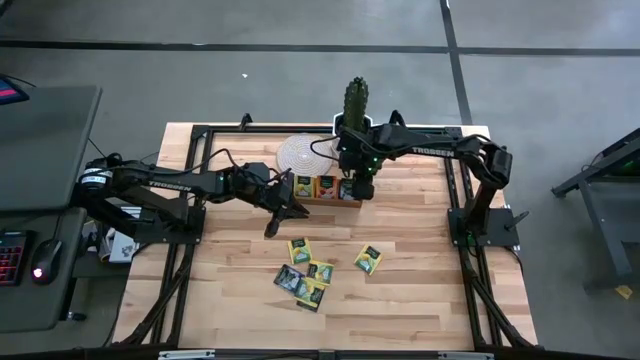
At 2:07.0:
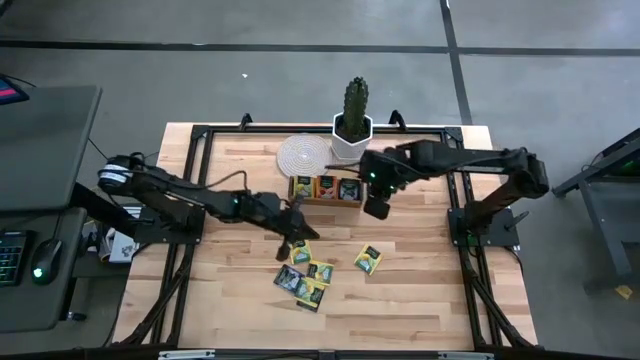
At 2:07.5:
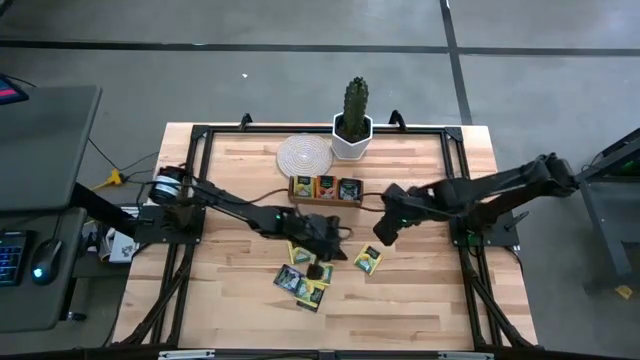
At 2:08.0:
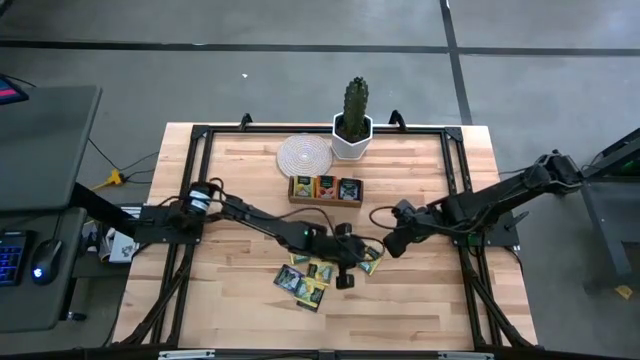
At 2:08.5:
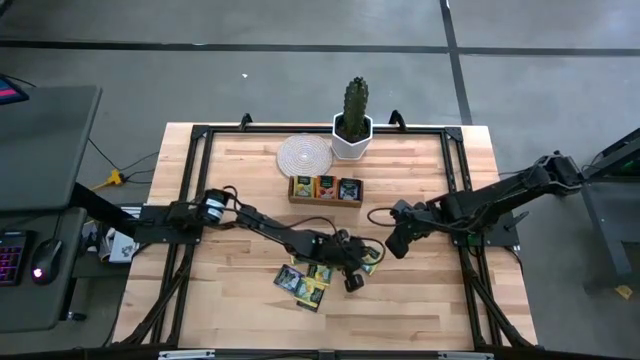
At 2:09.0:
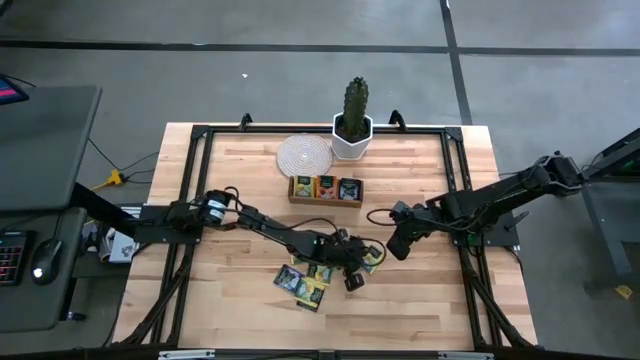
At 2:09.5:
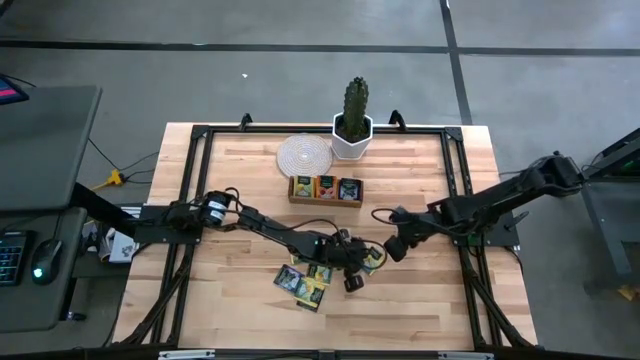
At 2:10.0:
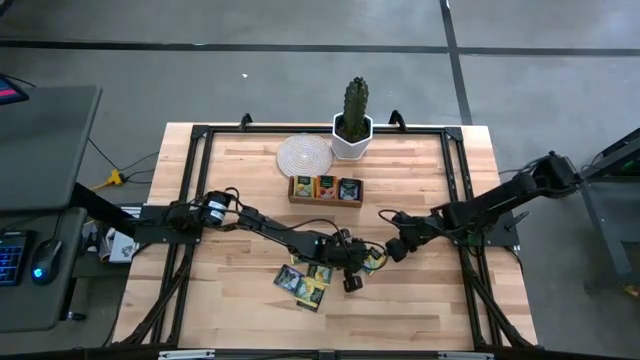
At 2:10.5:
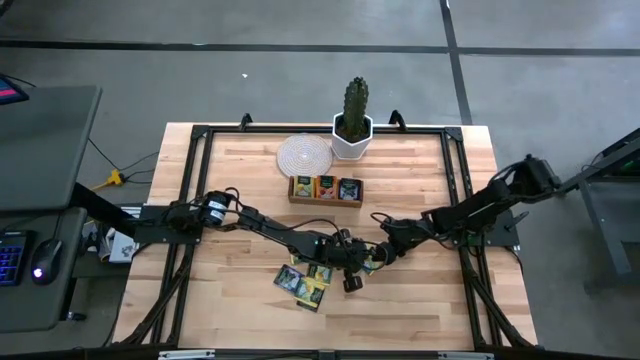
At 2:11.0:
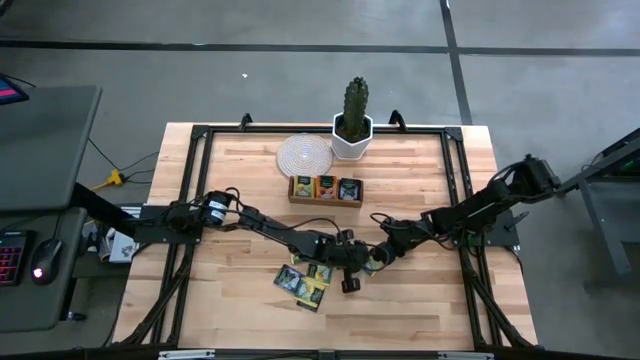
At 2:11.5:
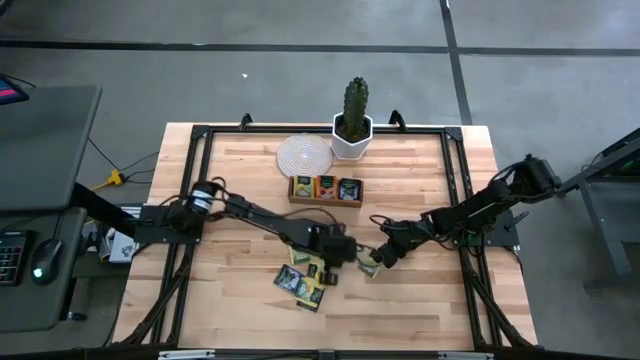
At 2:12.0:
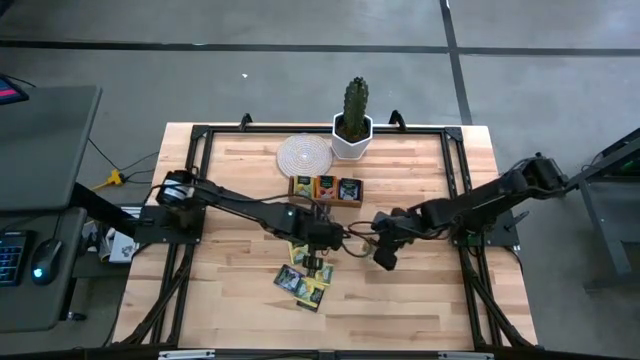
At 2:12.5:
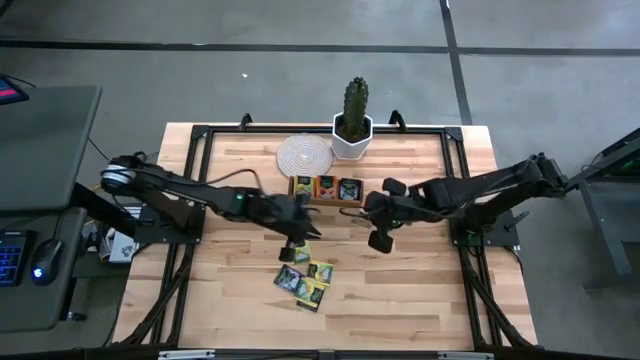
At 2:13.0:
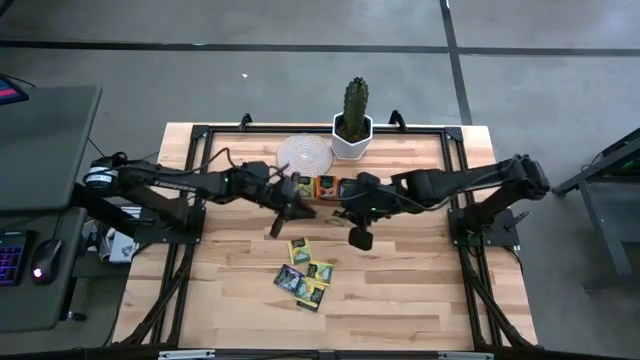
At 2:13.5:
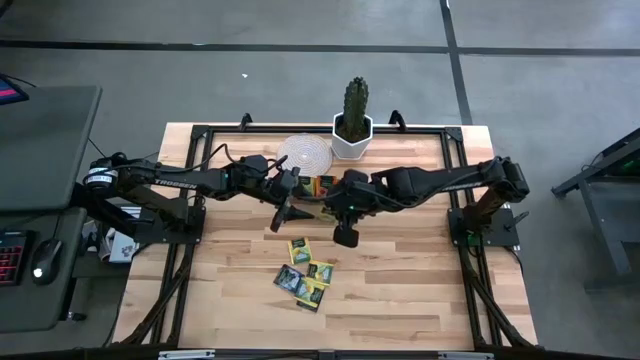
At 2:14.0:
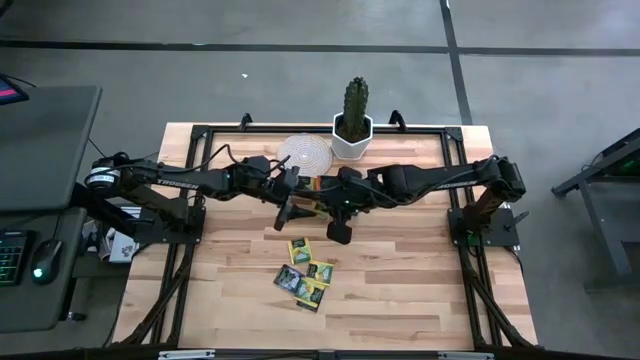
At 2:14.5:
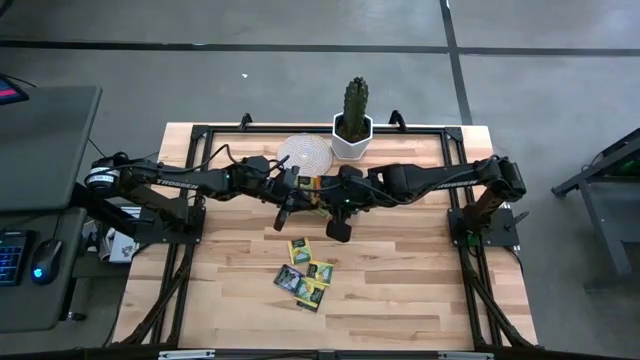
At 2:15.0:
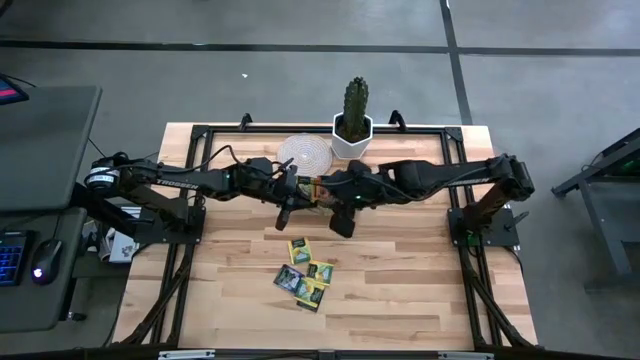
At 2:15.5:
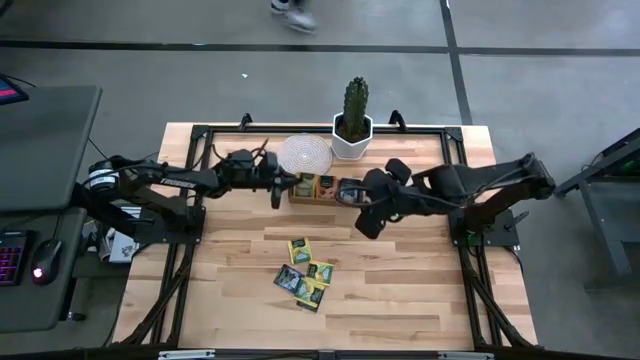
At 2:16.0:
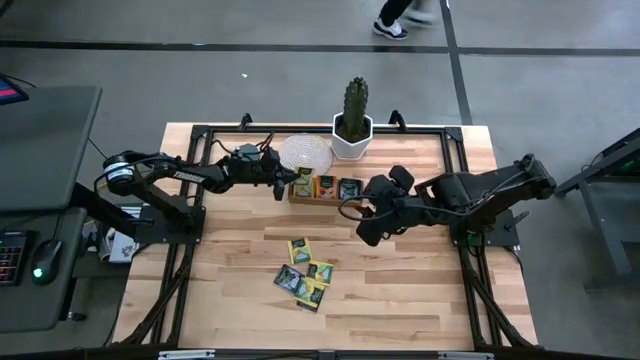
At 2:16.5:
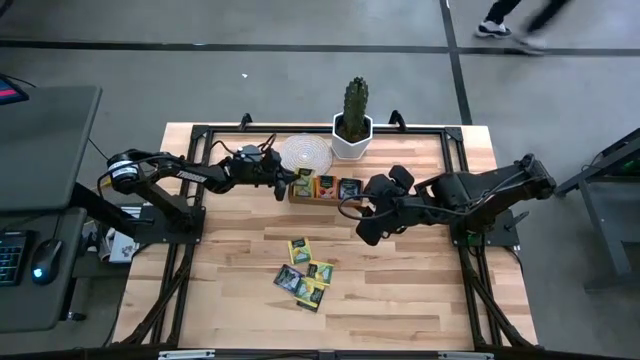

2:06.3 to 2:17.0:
Task: Pick & Place Tea
Put the yellow tea bag into the left section of the wooden organizer

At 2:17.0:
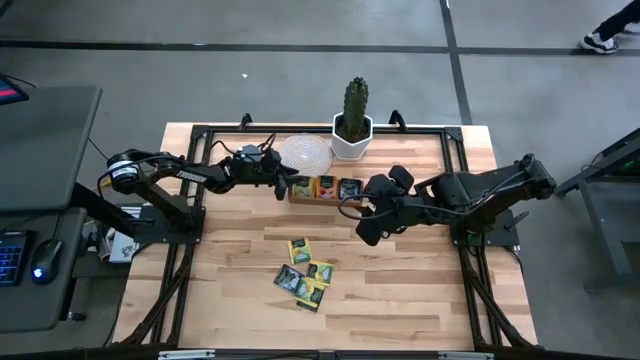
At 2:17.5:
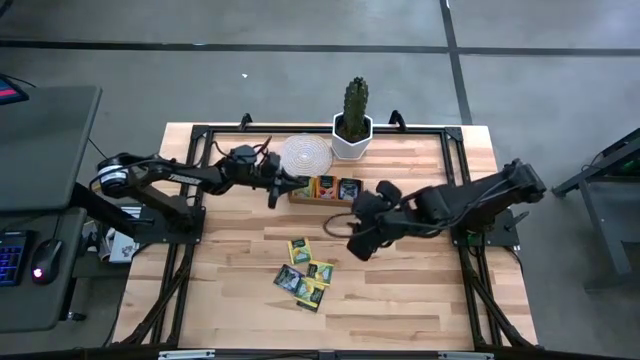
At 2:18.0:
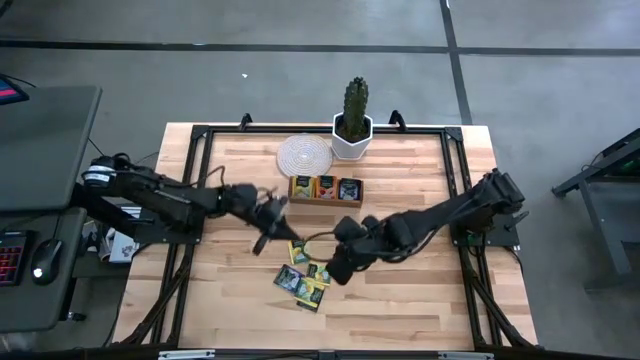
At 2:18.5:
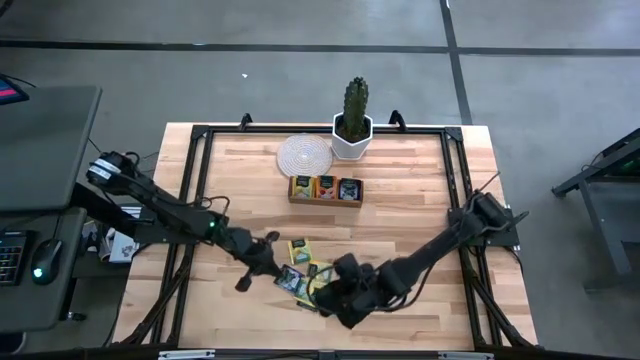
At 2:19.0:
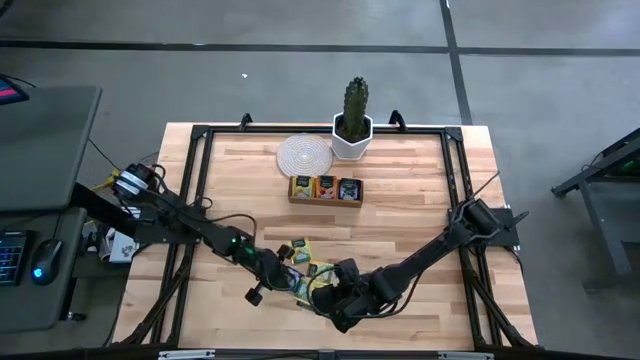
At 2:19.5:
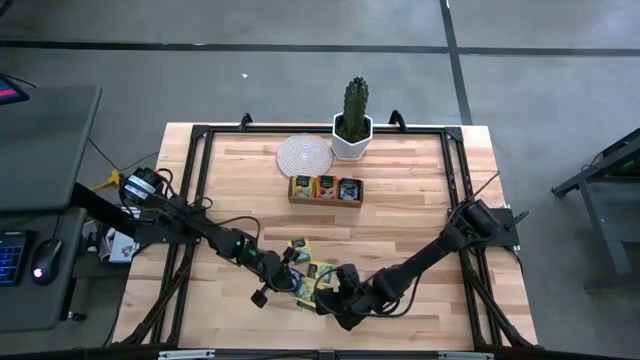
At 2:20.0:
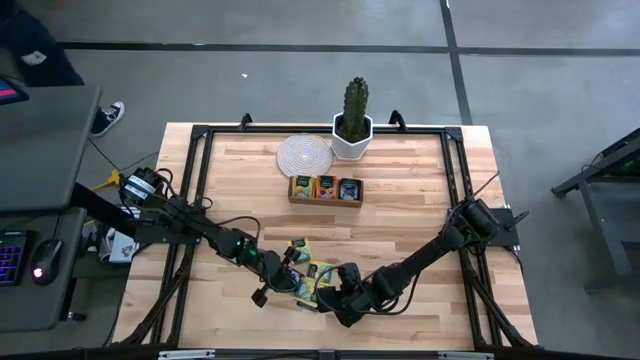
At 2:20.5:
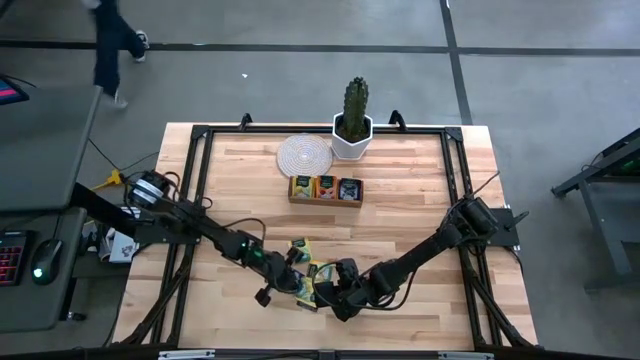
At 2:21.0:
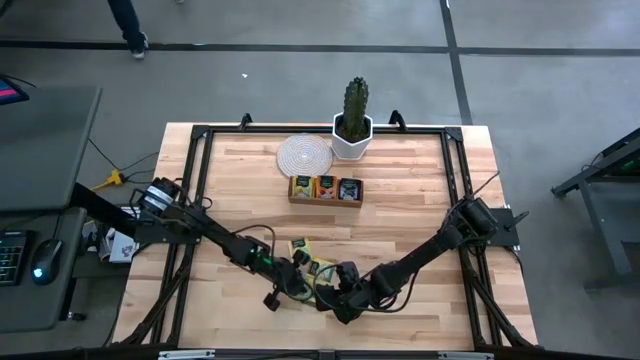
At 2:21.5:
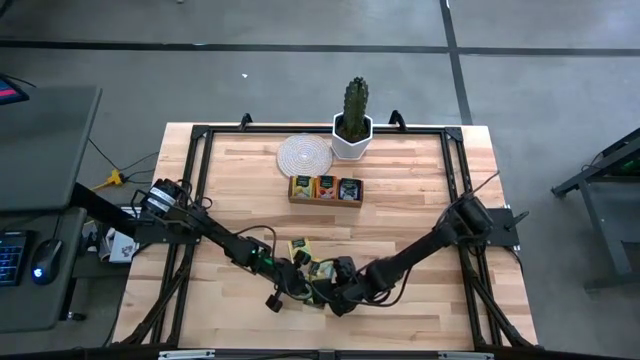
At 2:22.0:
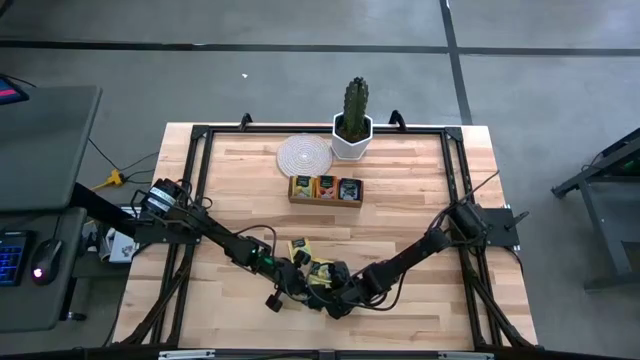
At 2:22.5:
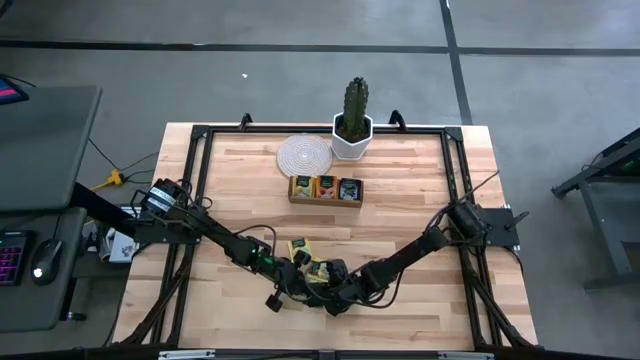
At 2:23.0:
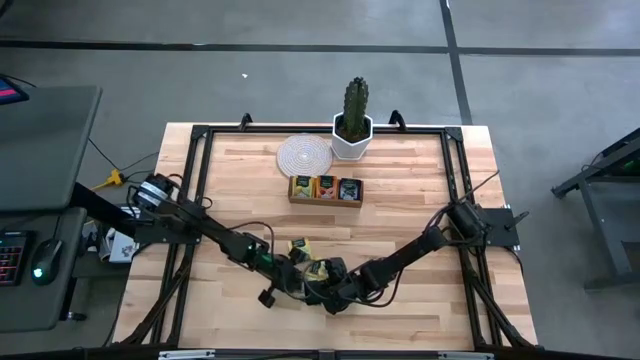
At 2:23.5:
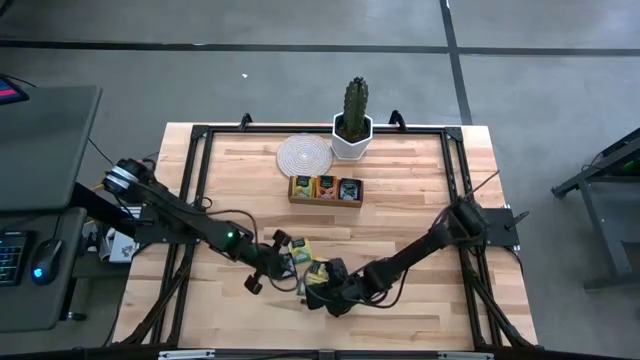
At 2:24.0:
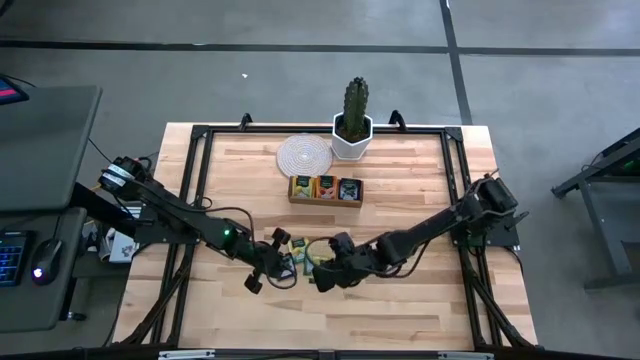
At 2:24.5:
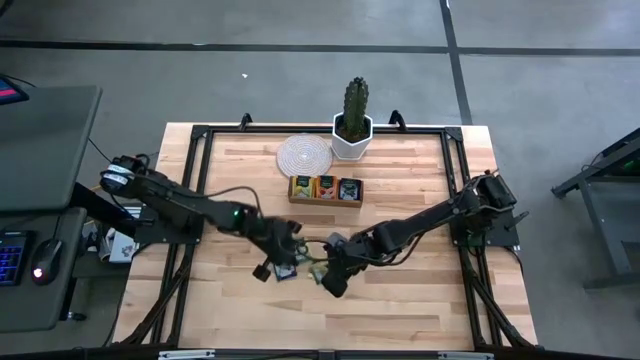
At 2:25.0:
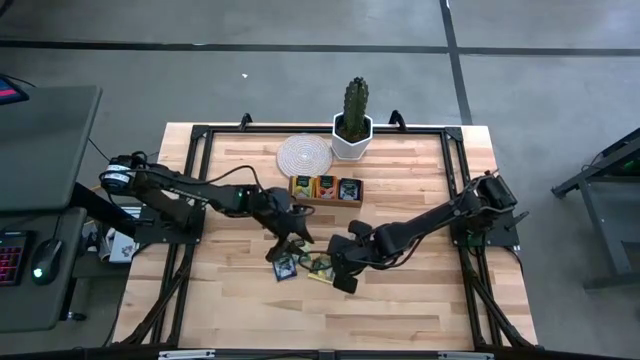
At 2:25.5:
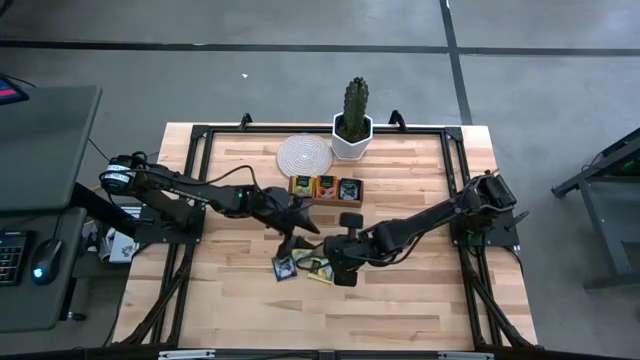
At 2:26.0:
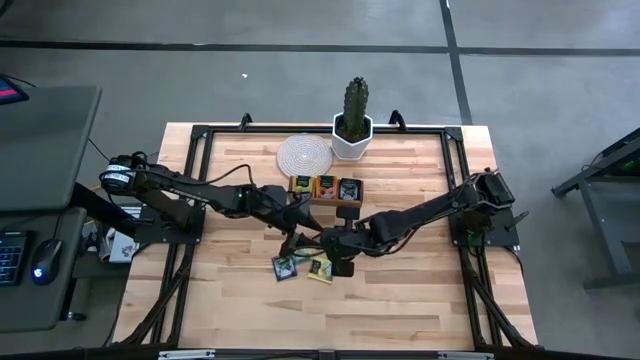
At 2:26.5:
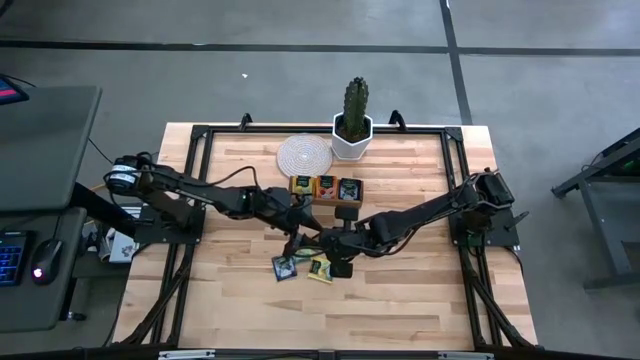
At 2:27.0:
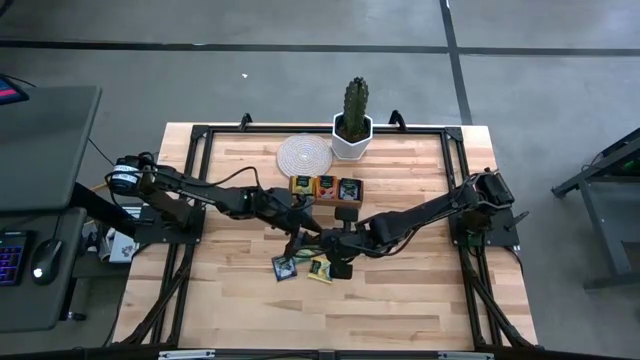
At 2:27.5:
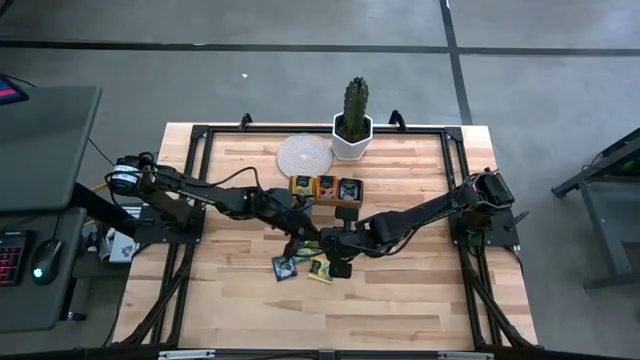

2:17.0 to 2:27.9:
Put the yellow tea bag into the left section of the wooden organizer

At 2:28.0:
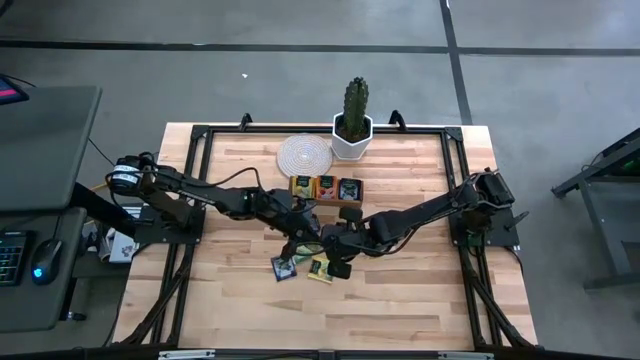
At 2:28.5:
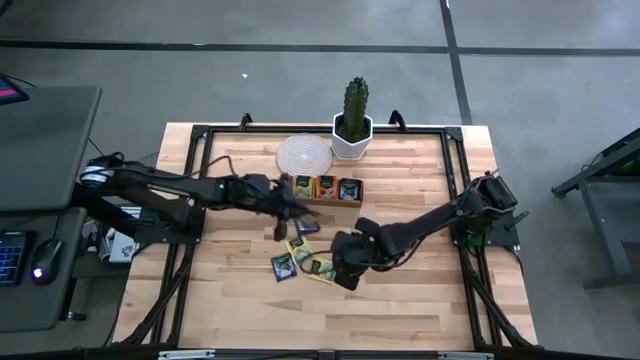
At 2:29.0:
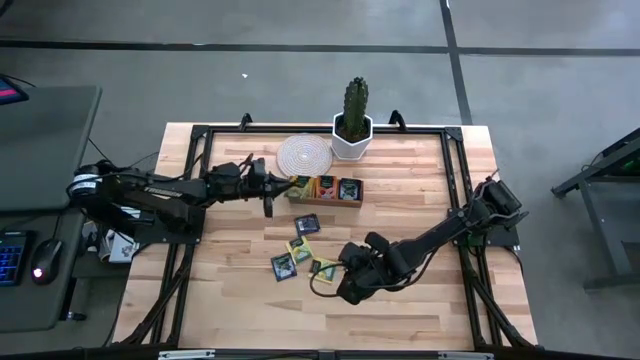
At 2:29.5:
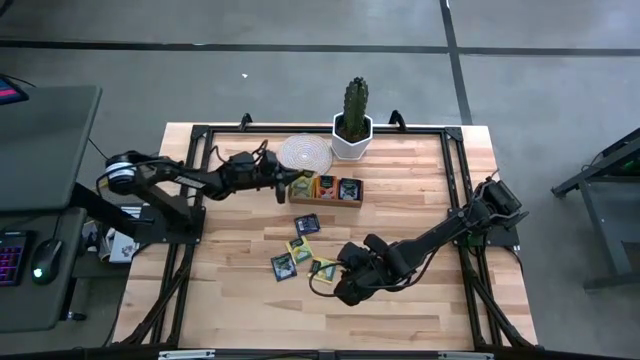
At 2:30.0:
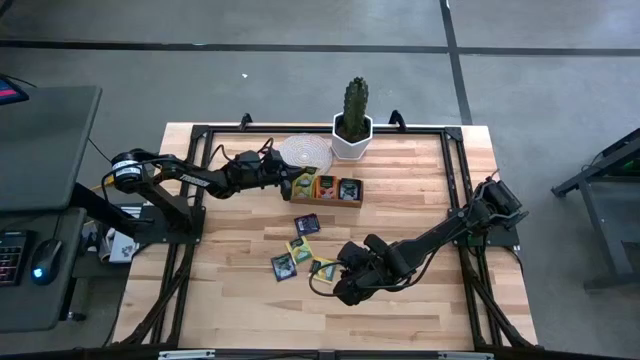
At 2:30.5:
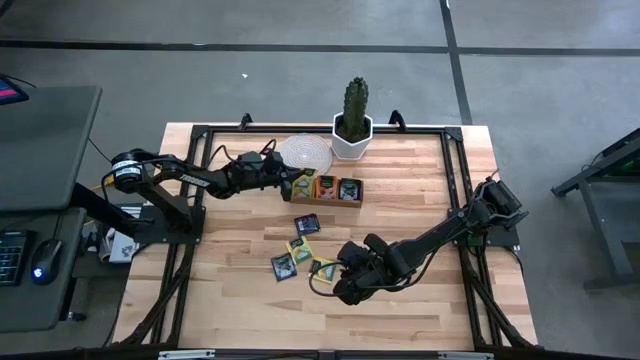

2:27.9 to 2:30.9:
Put the yellow tea bag into the left section of the wooden organizer
